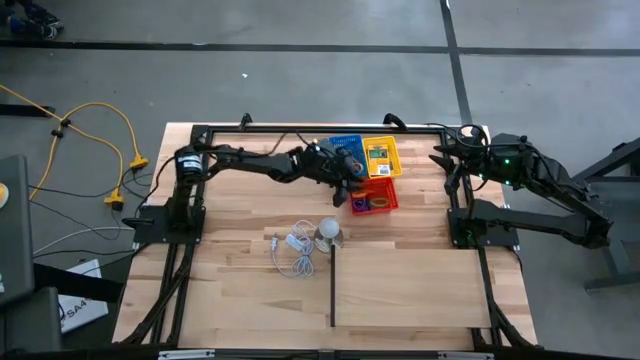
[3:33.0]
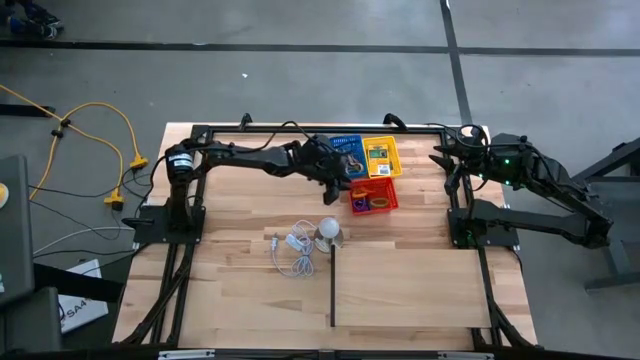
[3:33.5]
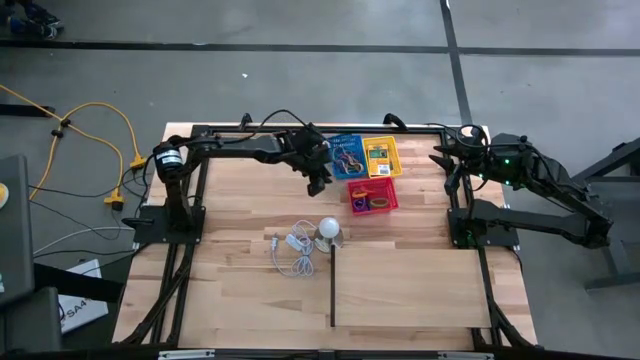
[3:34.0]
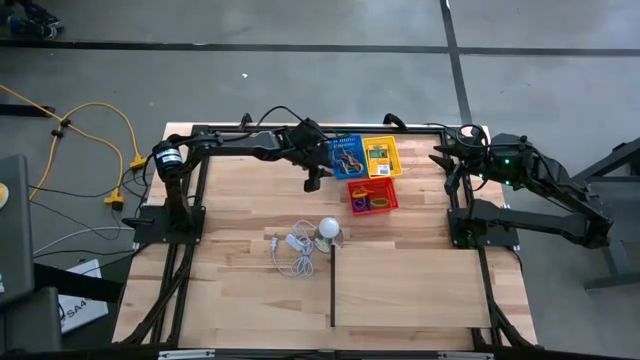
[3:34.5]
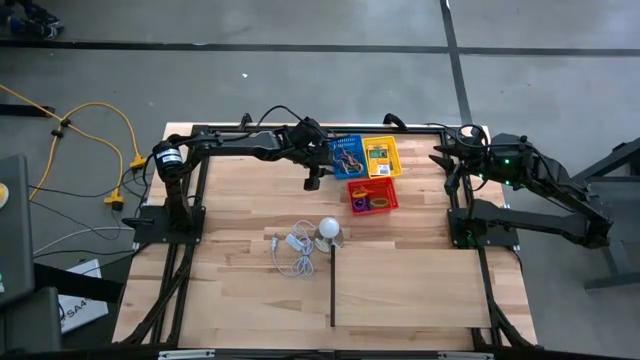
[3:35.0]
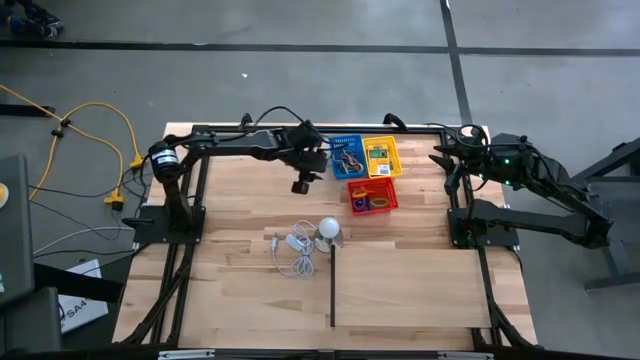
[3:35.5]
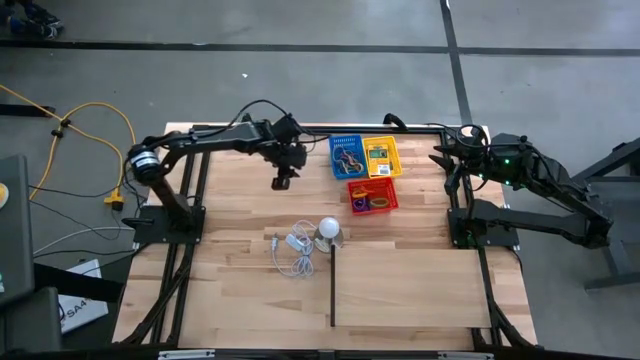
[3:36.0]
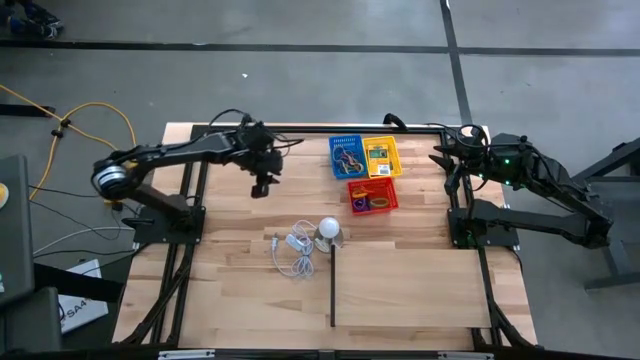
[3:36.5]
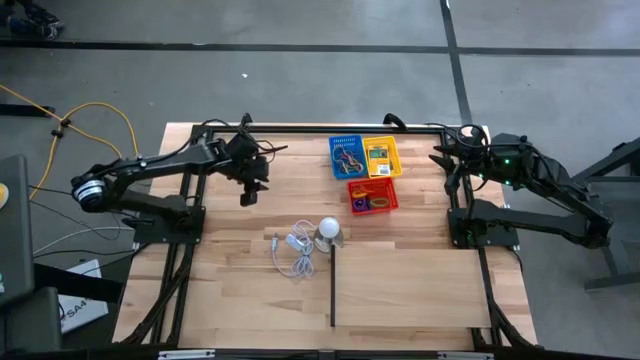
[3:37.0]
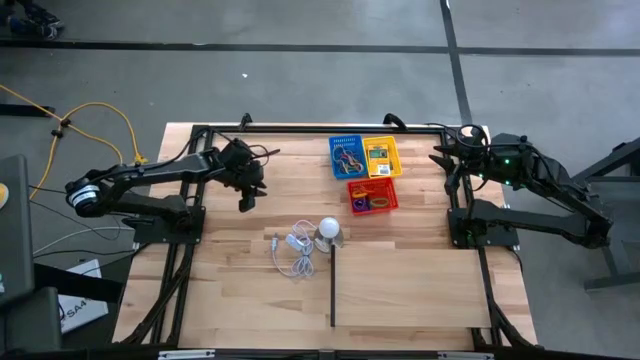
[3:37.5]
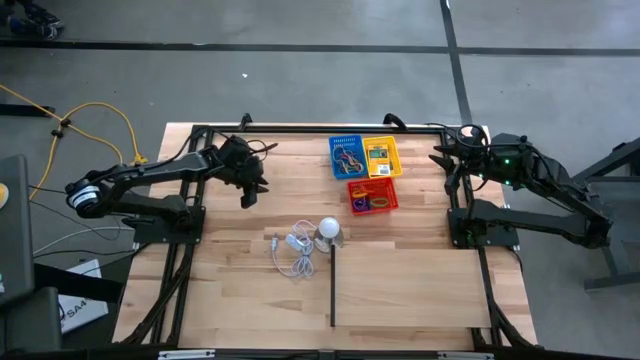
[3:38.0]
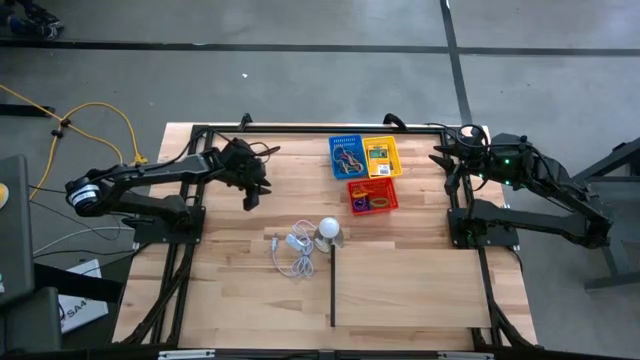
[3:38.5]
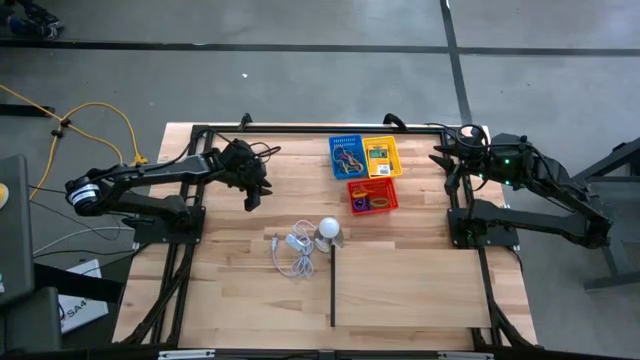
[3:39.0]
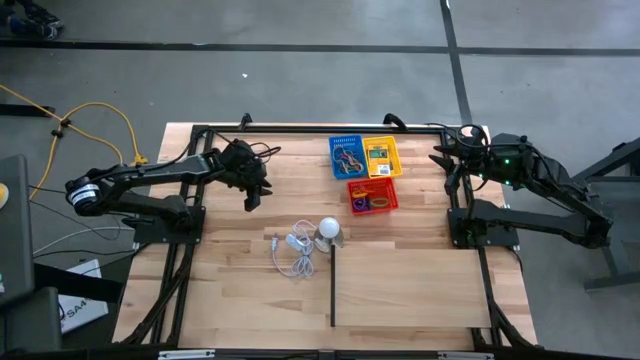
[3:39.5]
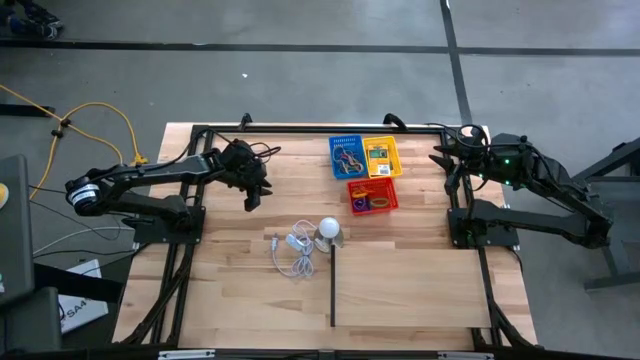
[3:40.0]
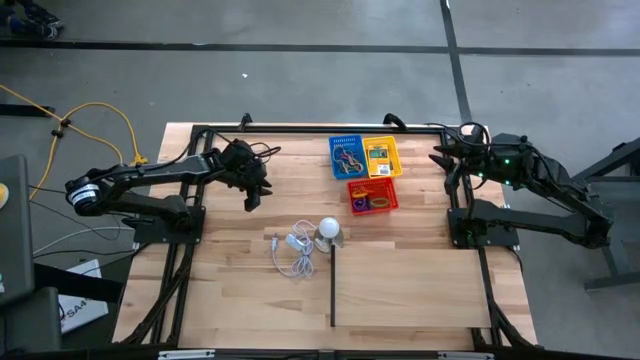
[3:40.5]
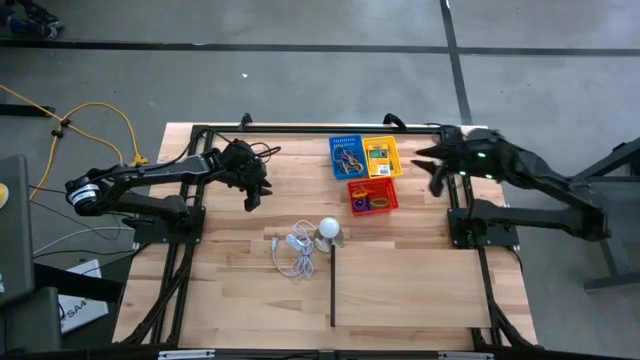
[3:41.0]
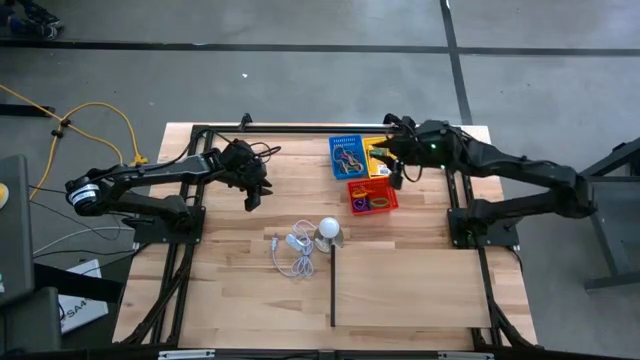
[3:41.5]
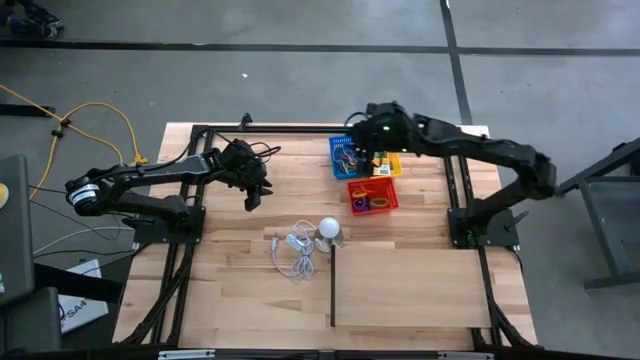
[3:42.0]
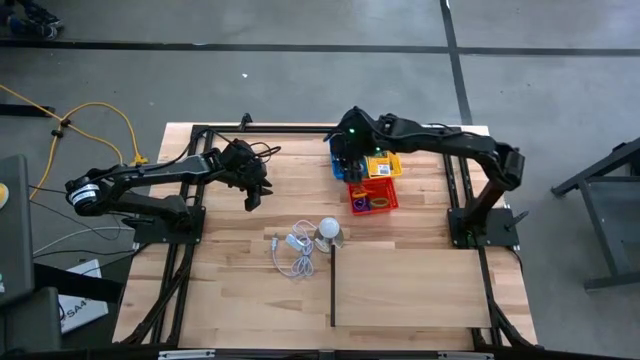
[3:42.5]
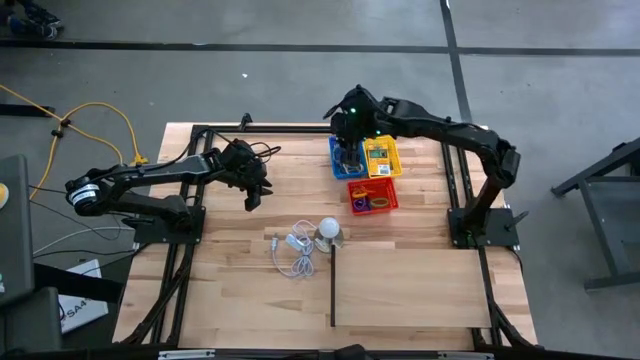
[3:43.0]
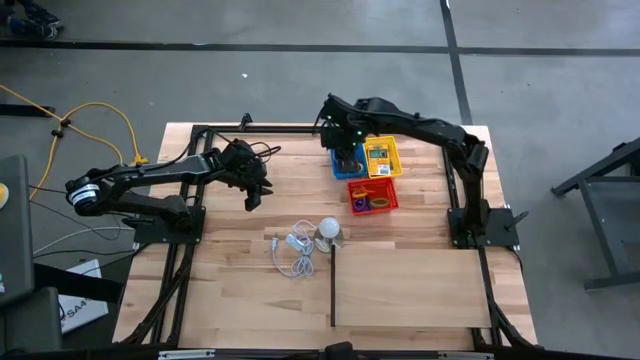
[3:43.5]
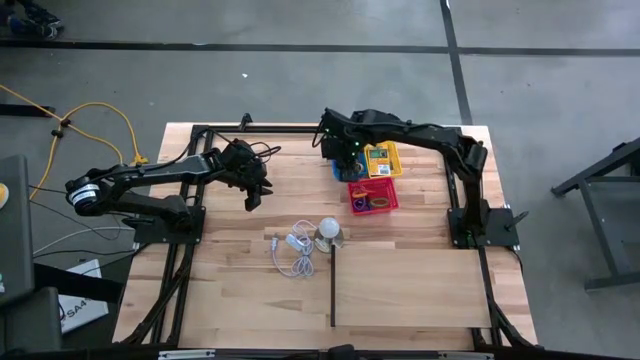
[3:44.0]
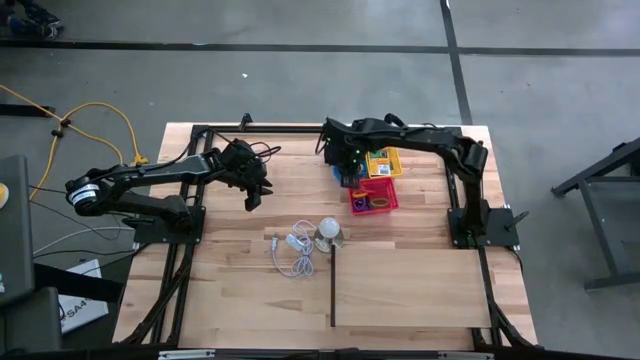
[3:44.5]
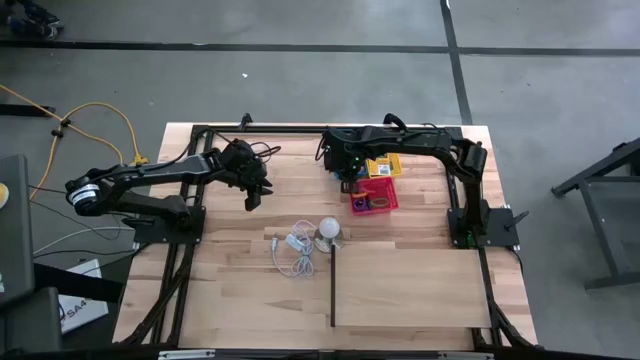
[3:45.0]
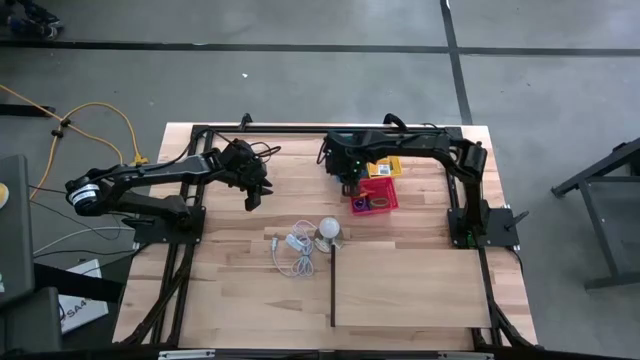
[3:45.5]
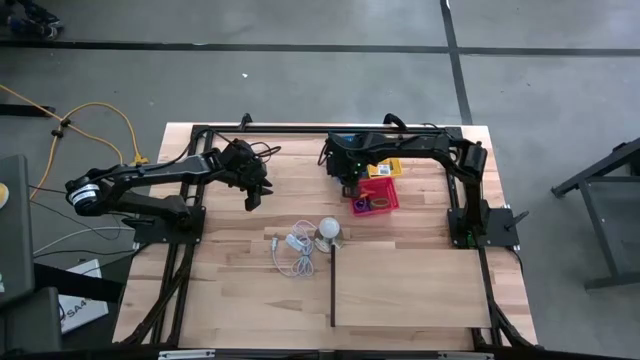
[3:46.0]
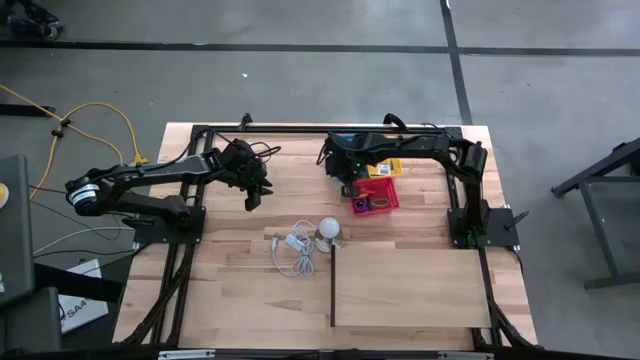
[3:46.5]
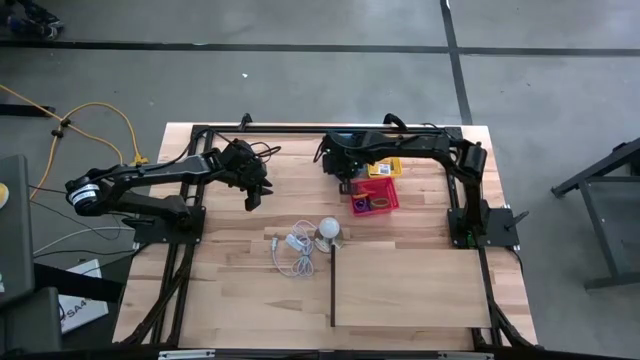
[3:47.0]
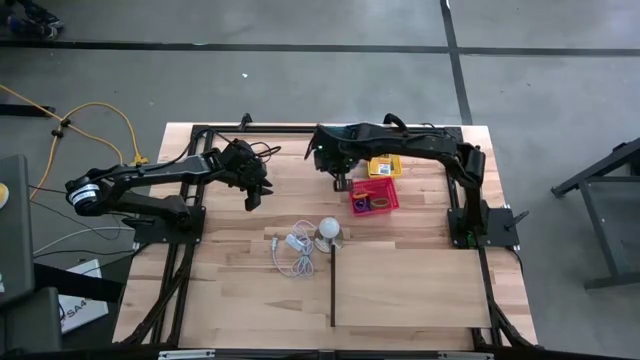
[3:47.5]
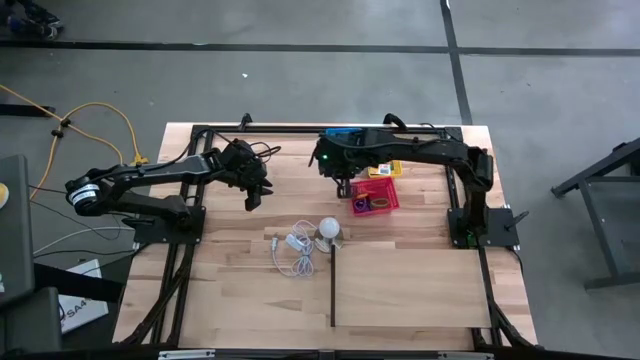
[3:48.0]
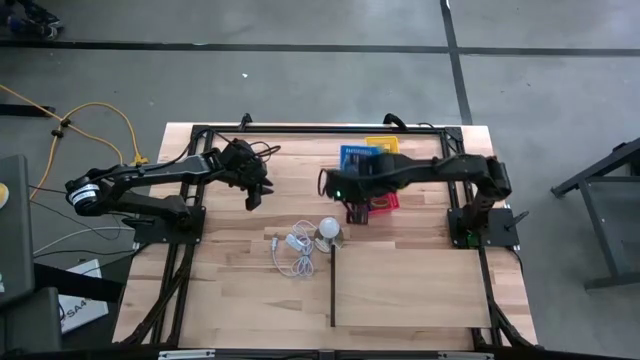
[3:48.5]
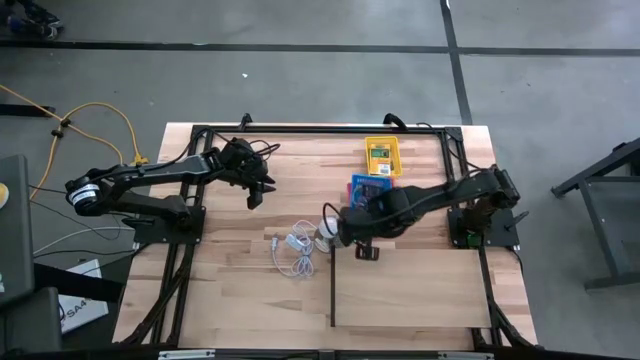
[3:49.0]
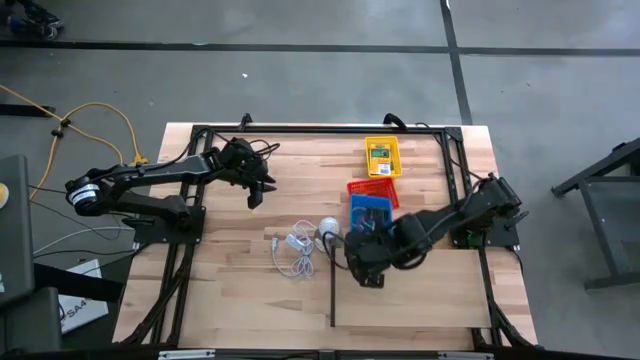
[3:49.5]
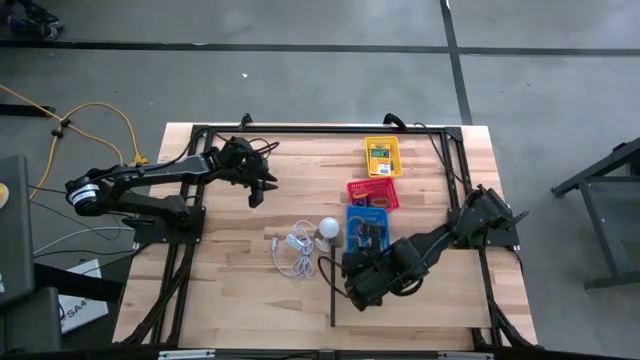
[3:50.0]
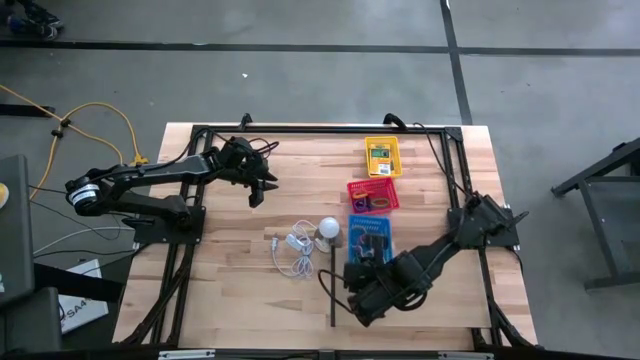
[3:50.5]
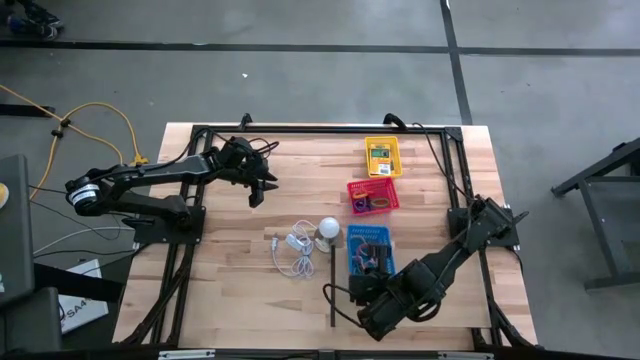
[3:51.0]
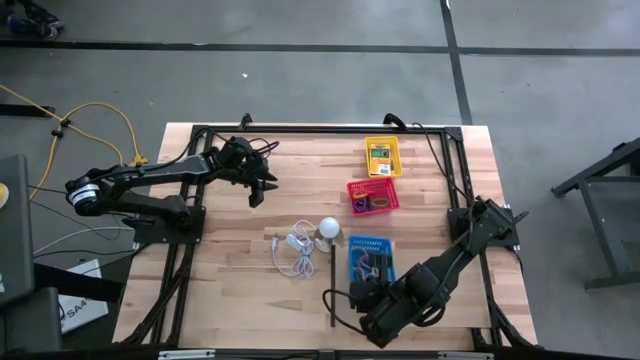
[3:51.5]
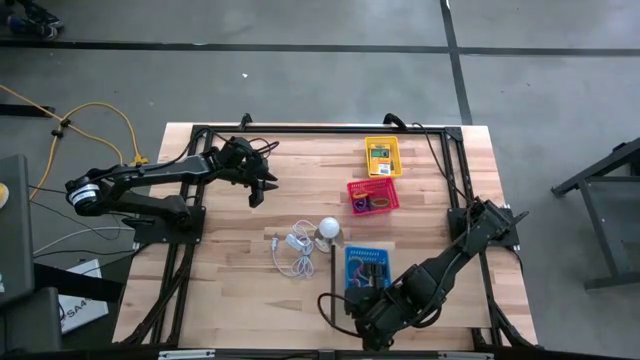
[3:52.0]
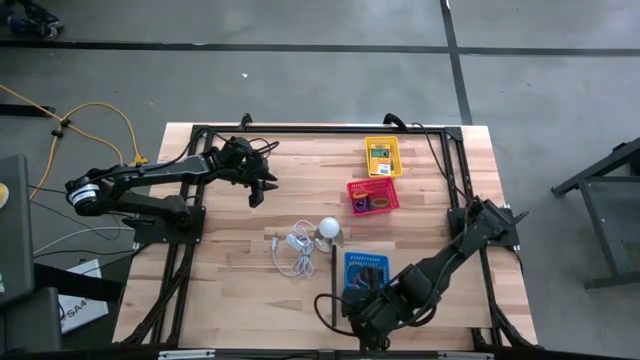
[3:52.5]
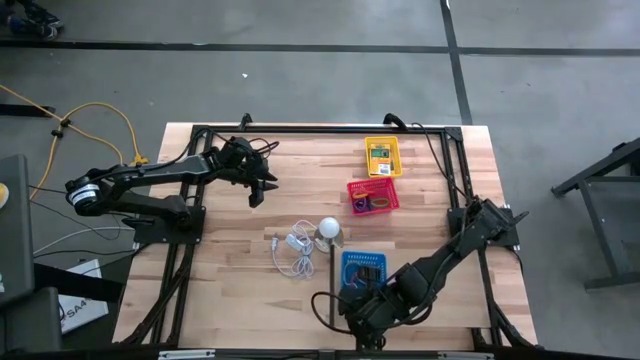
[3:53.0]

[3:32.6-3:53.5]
Task: Pick & Place Office Desk Supplies
Put the blue bin with the rubber bands on the shelf

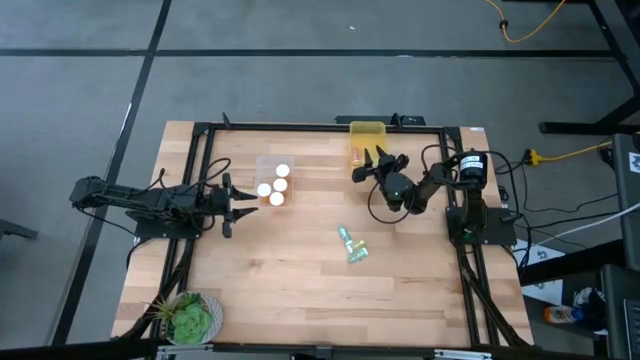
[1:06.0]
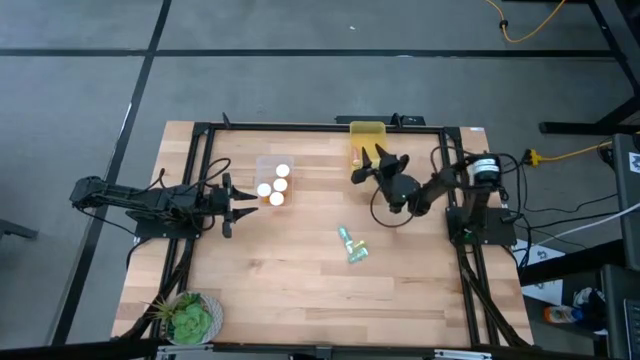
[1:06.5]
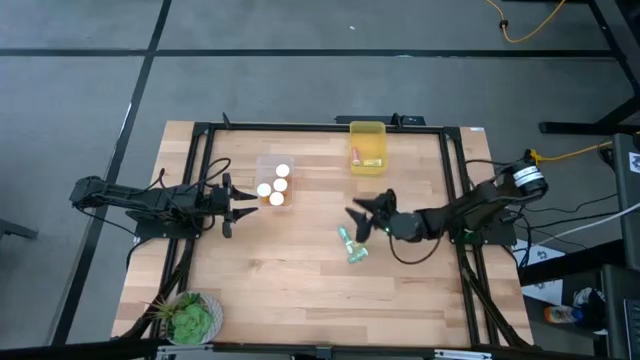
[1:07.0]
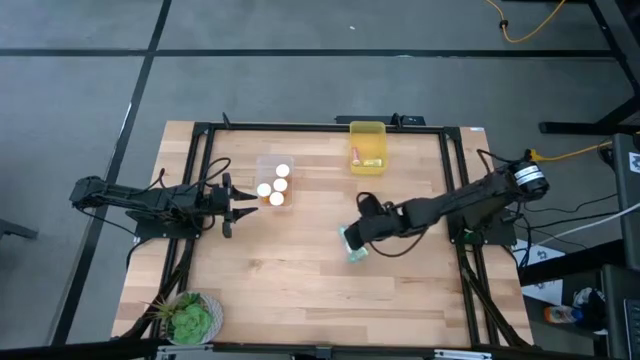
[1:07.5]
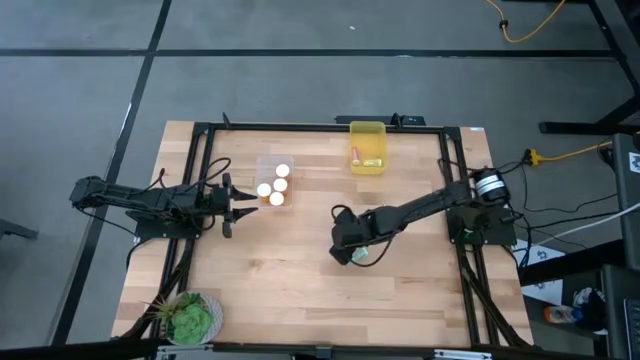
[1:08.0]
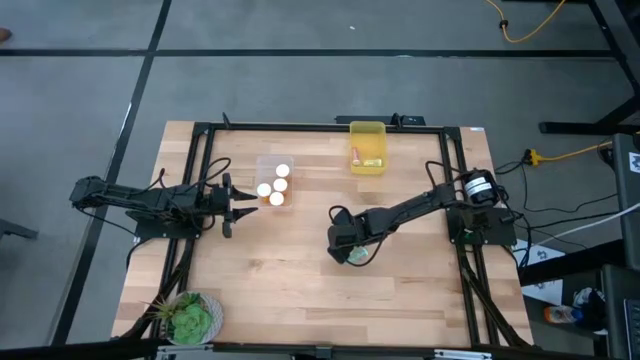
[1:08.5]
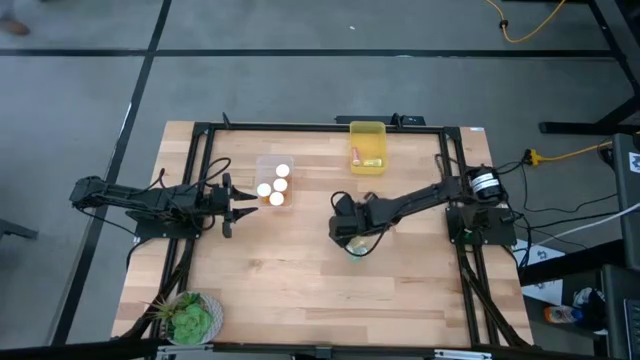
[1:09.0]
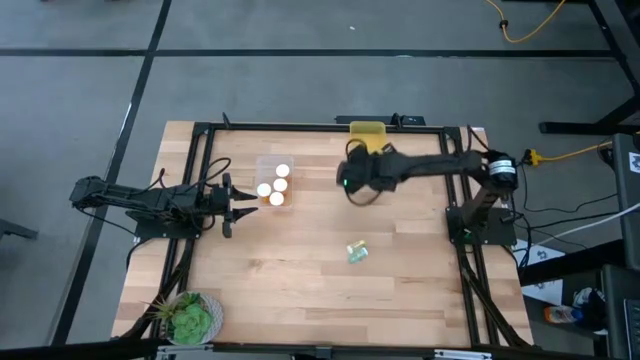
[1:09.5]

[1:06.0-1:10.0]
Task: Pick and place medicine bottles into bin by pill shape (circle, oval)
Put the small green pill bottle into the yellow bin
